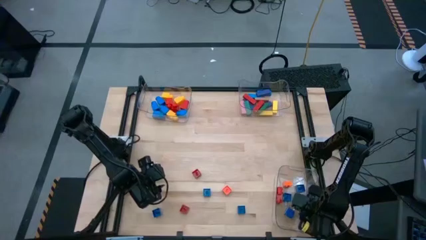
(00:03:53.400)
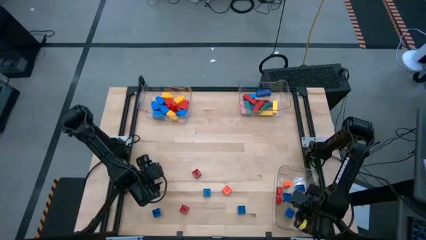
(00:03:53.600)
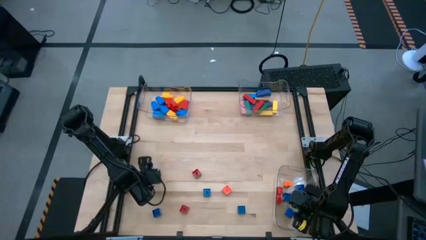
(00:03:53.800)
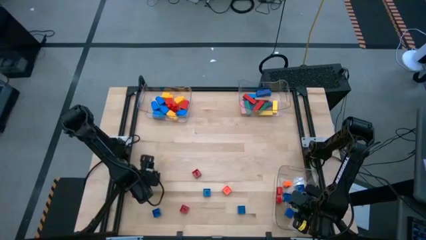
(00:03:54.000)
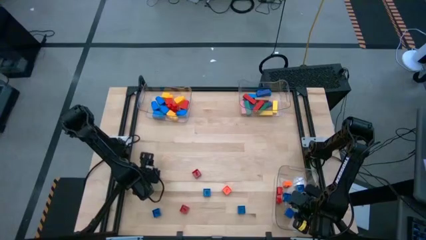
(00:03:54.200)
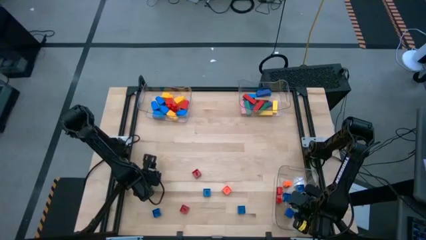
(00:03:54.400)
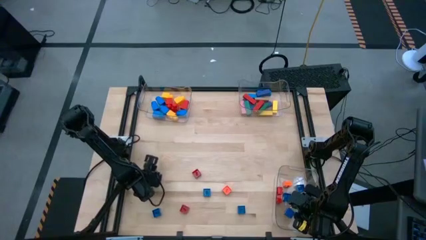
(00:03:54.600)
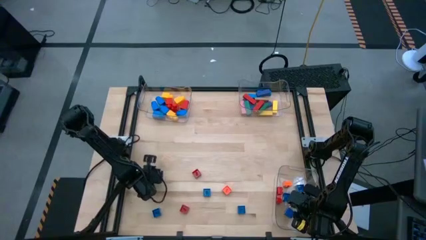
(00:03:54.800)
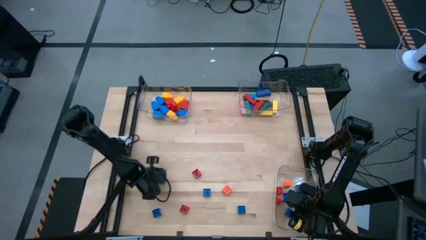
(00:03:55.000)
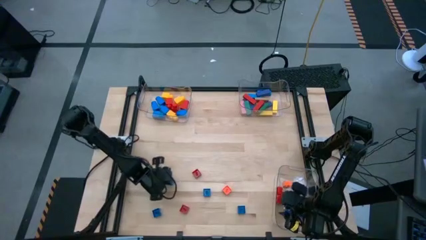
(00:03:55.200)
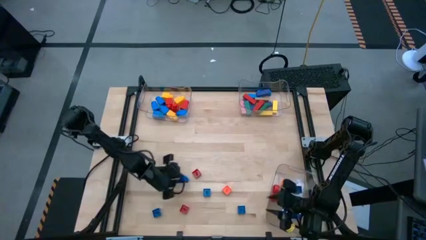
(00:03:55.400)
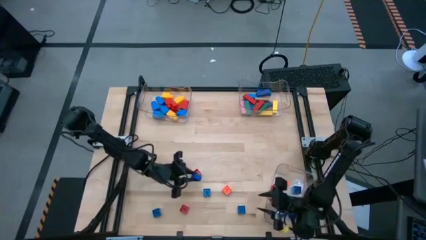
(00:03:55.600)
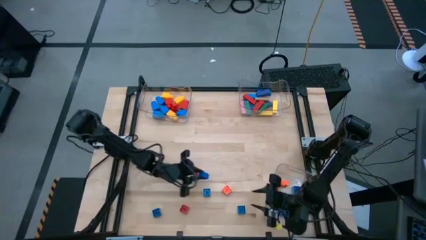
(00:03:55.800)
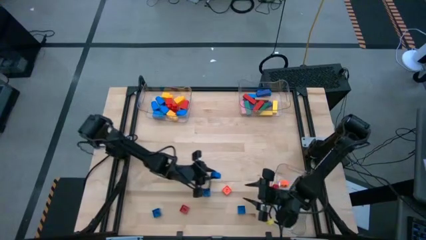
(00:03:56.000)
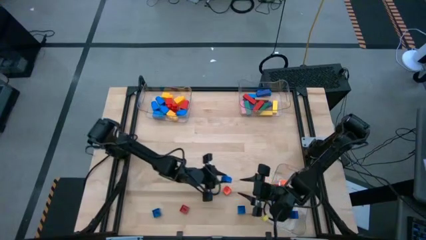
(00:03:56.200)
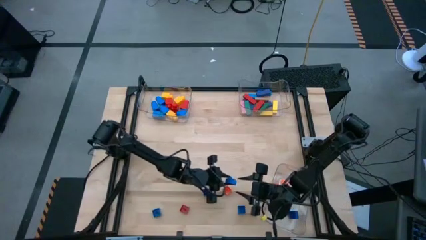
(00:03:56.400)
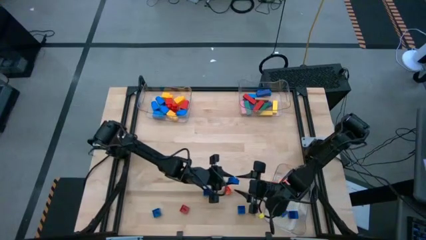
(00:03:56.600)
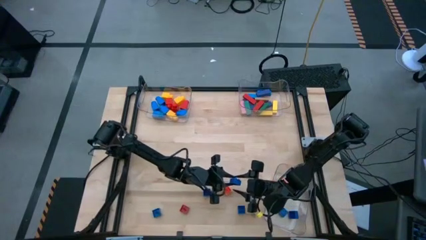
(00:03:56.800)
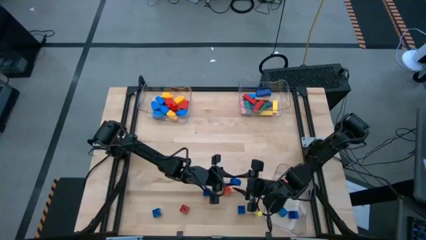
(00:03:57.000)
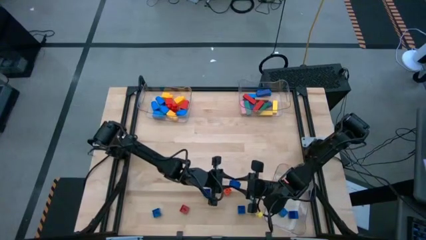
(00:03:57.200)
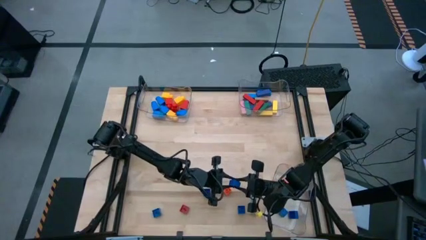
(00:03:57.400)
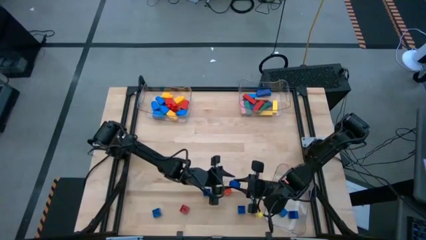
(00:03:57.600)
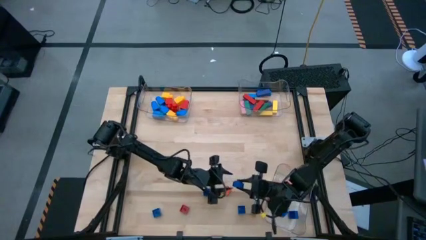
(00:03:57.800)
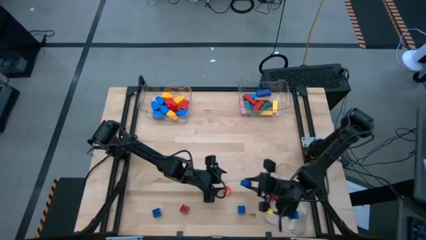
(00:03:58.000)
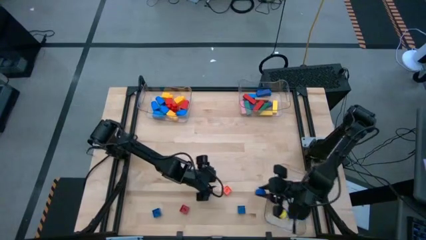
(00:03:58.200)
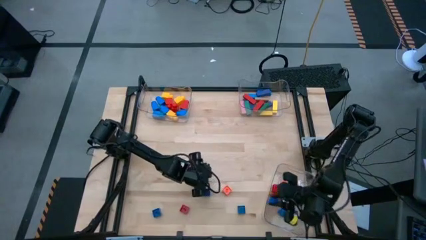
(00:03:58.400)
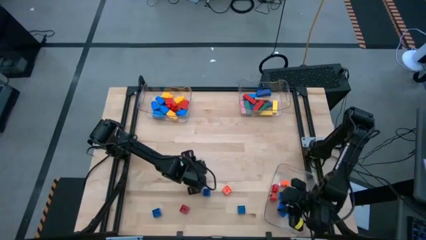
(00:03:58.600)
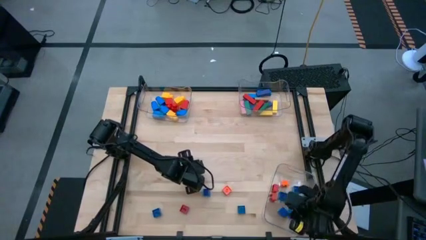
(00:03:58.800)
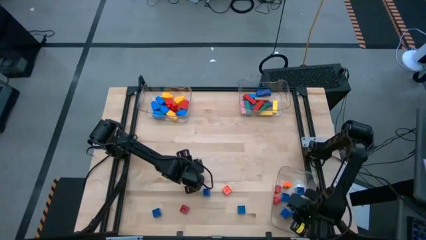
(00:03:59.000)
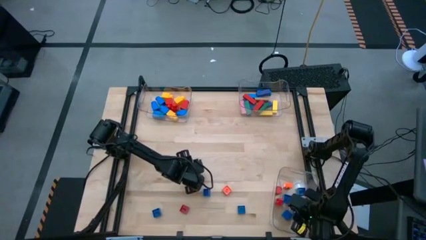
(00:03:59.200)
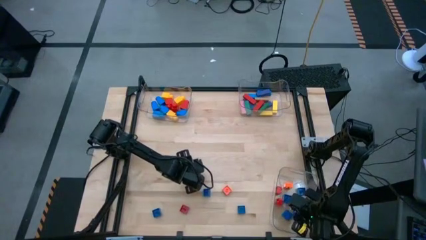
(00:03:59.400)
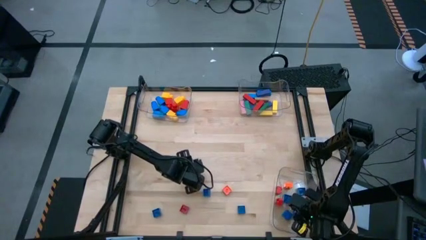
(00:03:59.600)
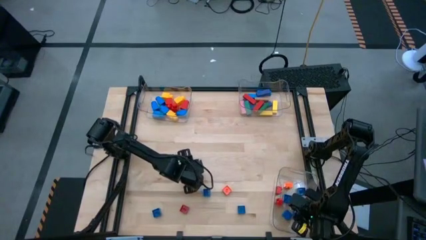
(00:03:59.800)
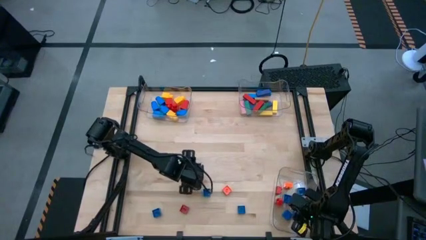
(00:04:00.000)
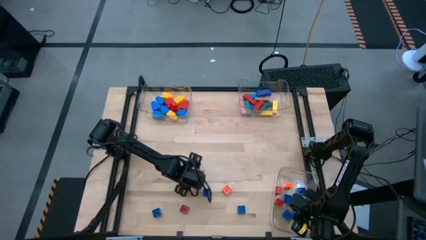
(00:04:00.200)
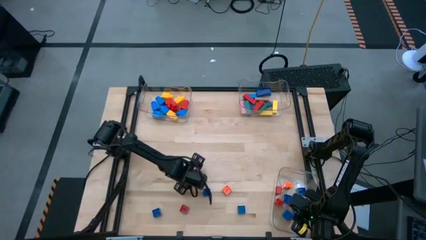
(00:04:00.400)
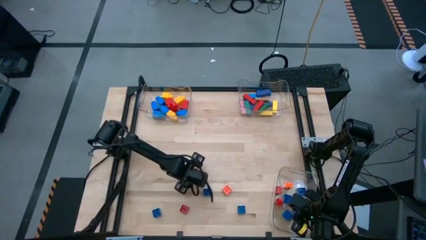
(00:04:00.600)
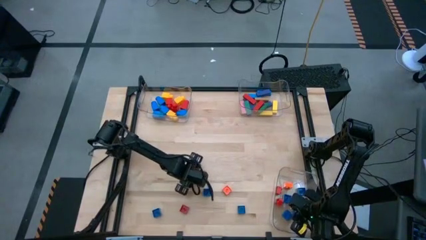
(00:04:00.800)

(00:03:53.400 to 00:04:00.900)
Task: Sort blocks by size
Put the 4 stud blue game piece into the bottom transparent bin

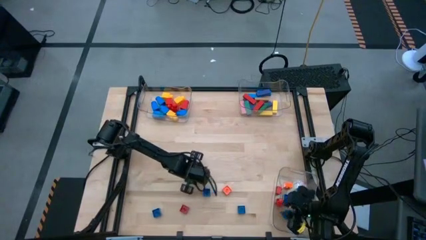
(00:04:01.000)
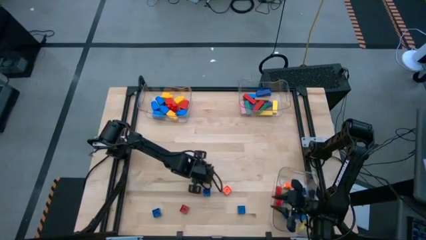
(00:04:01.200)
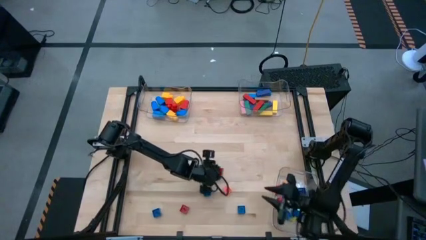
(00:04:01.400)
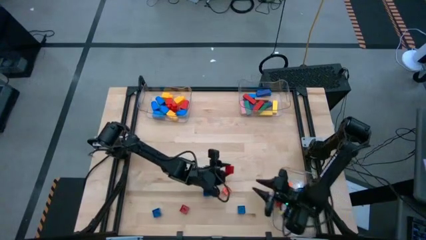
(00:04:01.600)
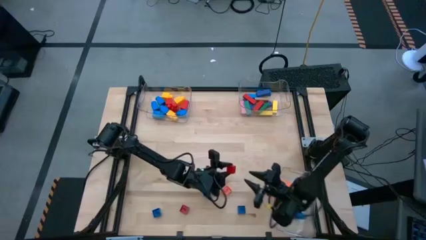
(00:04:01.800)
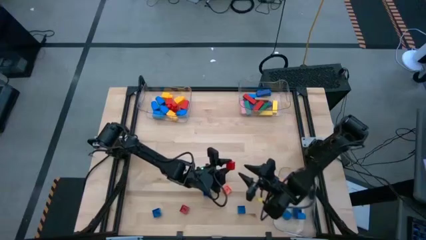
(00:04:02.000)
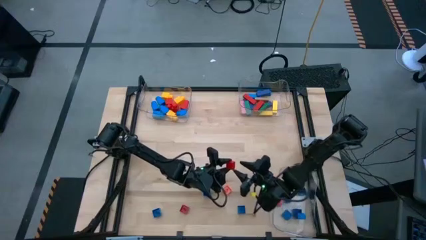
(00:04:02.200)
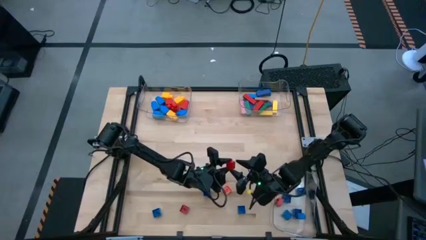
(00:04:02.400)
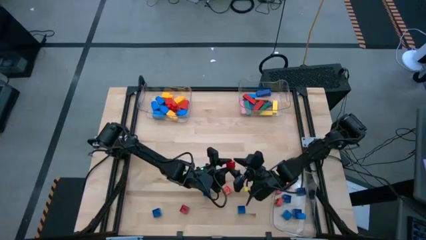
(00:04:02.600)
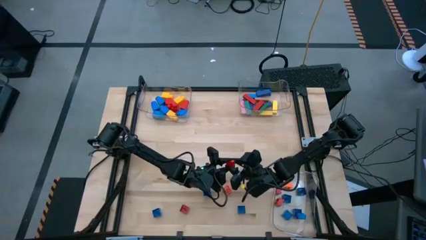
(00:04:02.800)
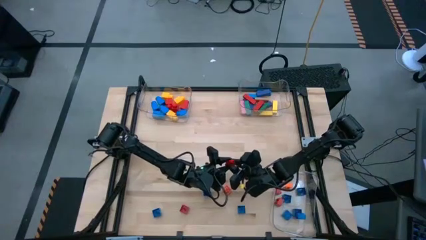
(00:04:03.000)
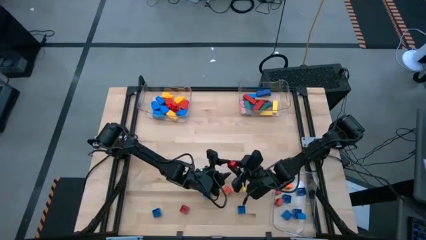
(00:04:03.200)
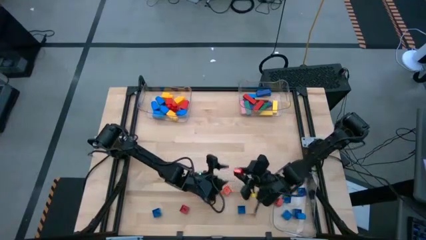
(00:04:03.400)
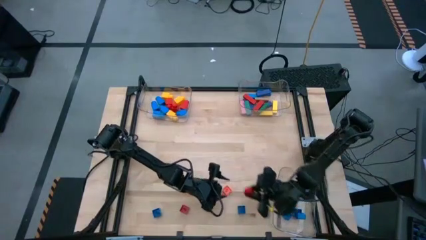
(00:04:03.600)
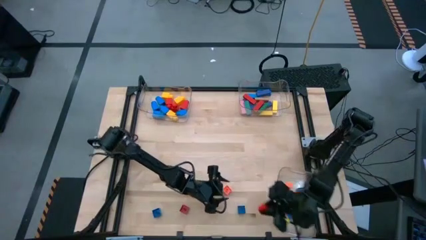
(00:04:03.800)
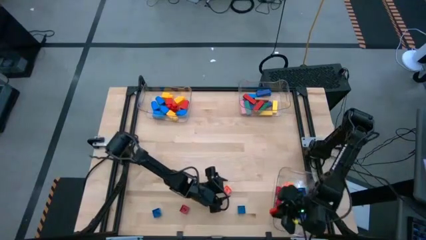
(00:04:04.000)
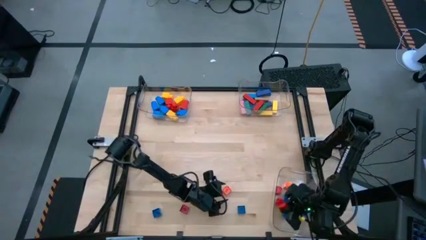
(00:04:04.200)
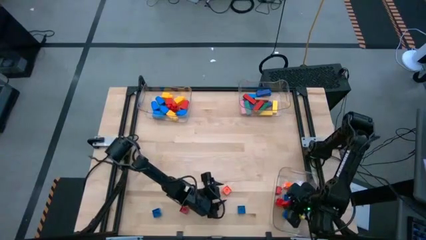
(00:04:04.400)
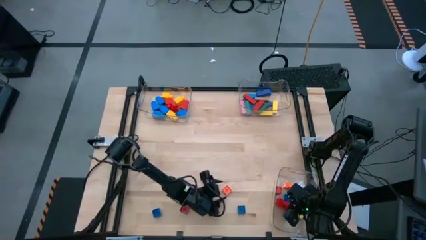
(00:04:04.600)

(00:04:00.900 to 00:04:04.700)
Put the 4 stud red game piece into the bottom transparent bin

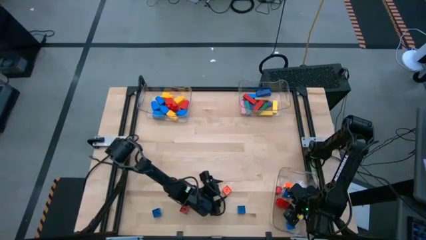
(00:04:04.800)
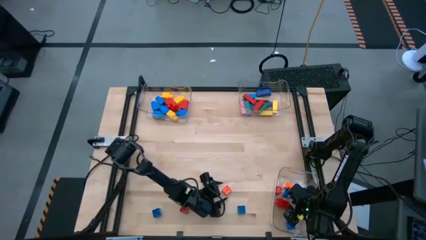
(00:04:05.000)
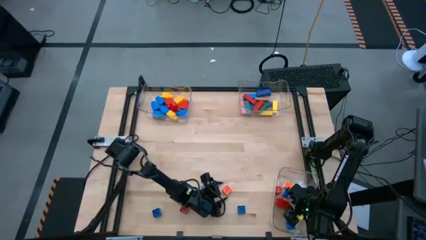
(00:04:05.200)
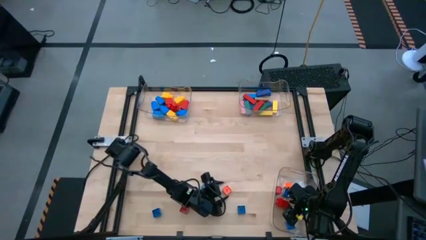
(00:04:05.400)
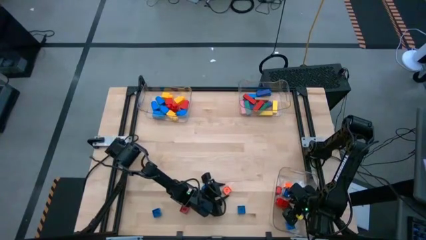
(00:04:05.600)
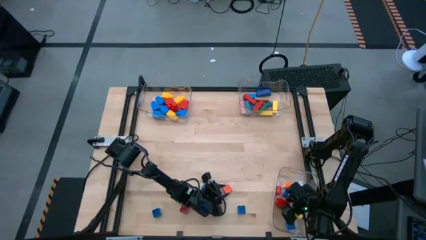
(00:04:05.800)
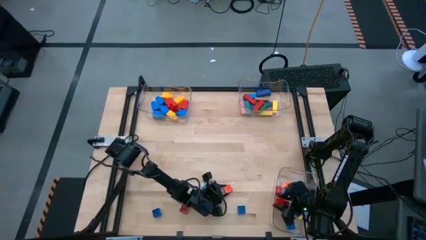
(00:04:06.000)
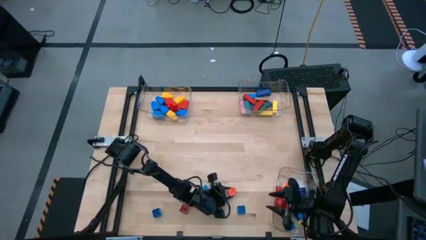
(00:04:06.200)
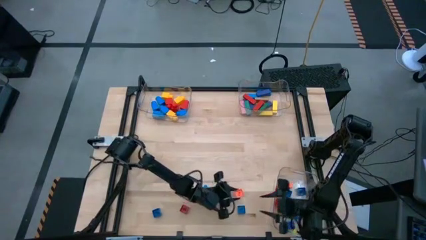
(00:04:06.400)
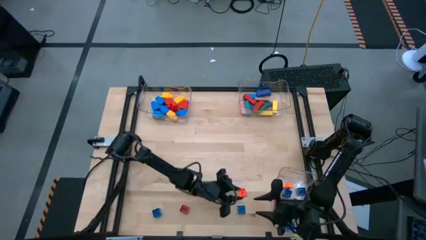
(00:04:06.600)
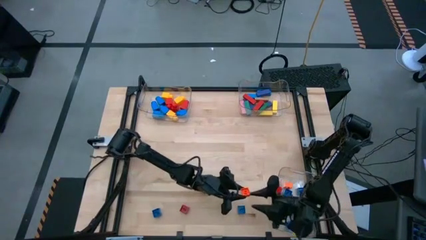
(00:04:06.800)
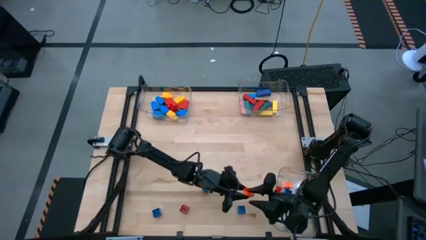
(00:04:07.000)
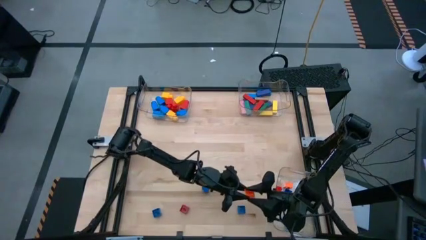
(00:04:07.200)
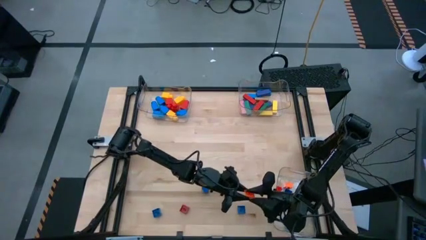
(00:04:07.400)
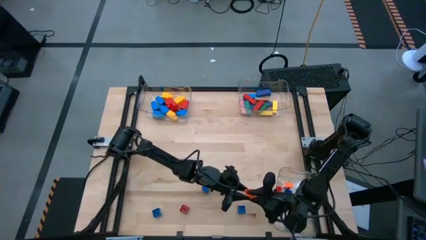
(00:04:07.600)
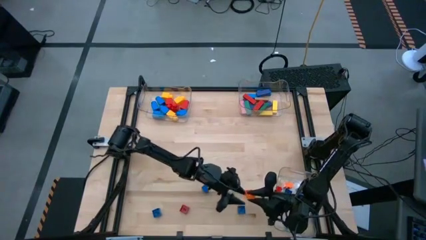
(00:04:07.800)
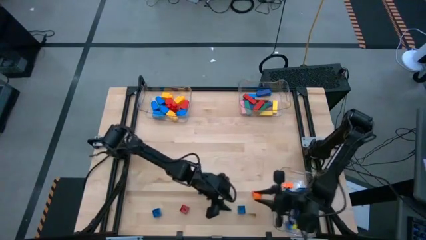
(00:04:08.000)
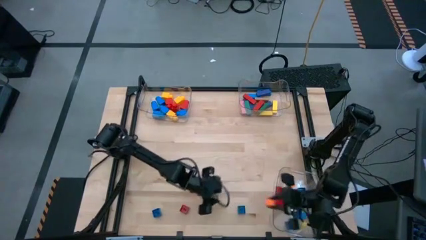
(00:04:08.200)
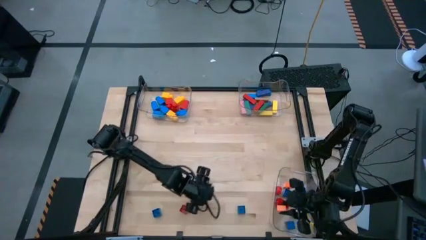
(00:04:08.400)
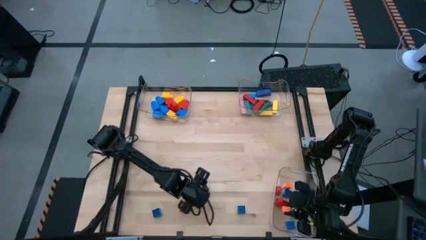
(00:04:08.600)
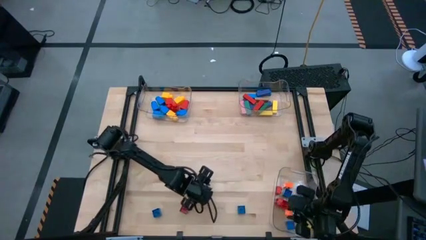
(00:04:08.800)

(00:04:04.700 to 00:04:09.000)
Put the 4 stud orange game piece into the bottom transparent bin

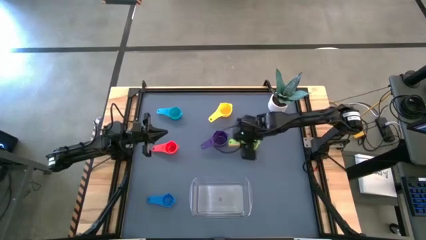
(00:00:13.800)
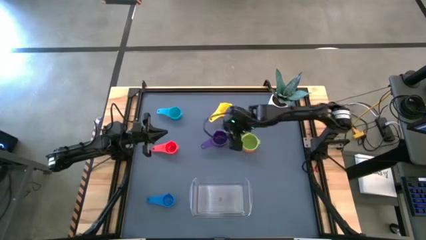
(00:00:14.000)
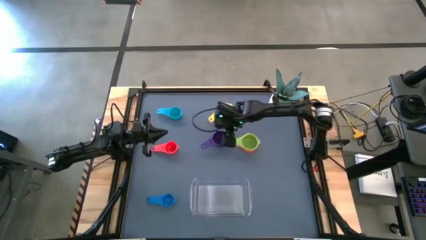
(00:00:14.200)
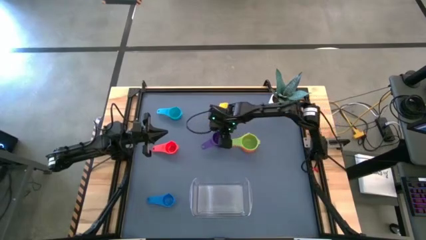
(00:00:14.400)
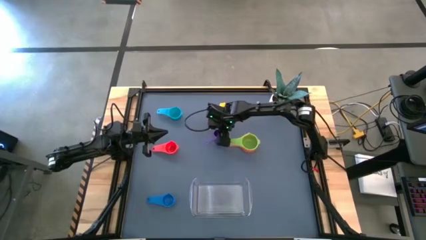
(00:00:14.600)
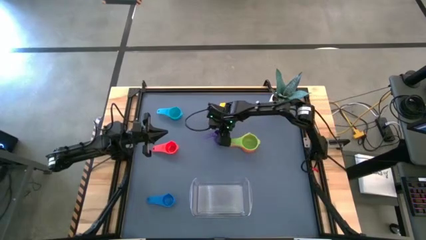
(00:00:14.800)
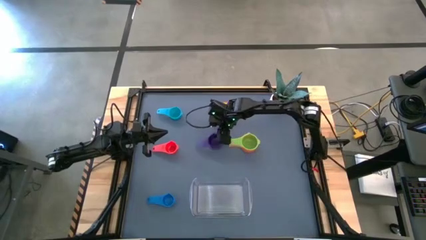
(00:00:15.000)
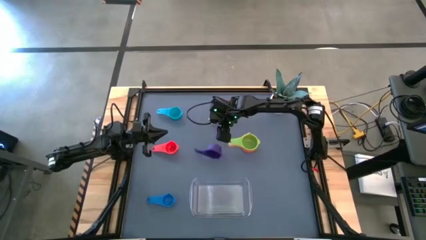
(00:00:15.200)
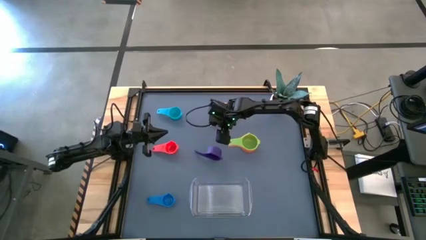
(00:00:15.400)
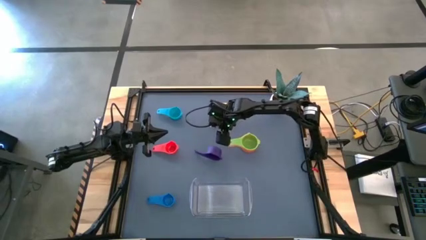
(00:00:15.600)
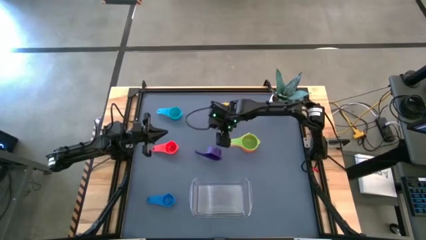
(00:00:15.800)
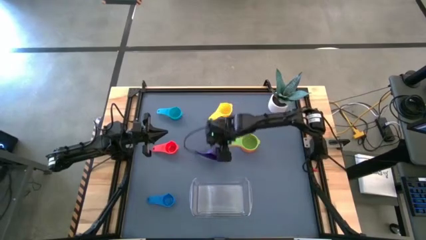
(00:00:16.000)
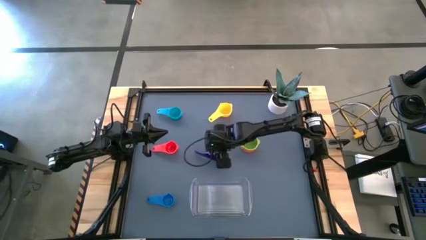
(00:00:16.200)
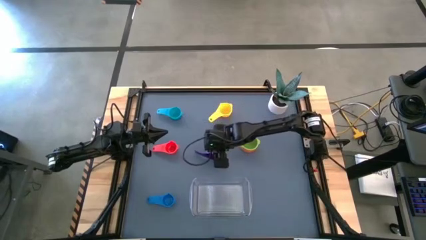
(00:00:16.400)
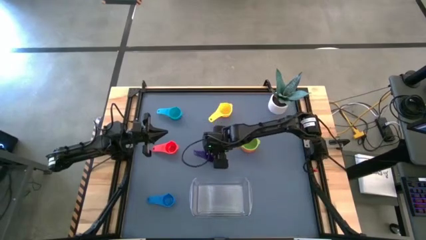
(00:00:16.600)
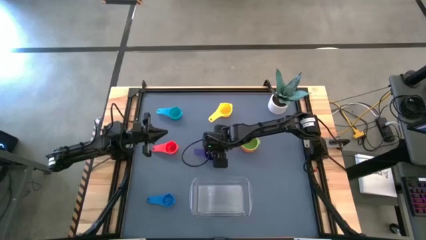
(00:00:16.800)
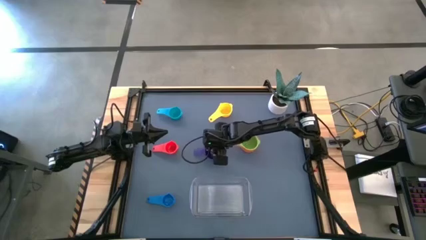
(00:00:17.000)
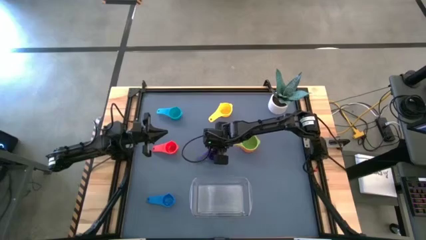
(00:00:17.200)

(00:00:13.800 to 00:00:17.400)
Task: Nest measuring cups in basket
Stack the violet measuring cup on top of the green measuring cup
